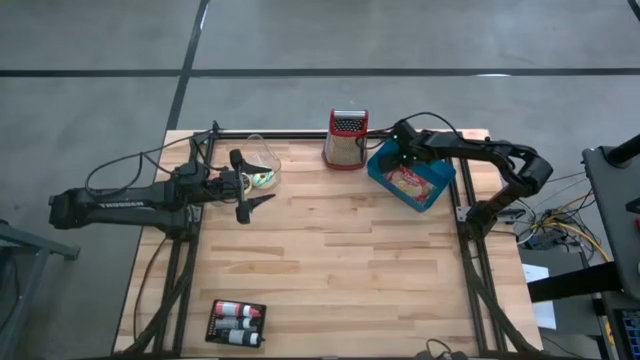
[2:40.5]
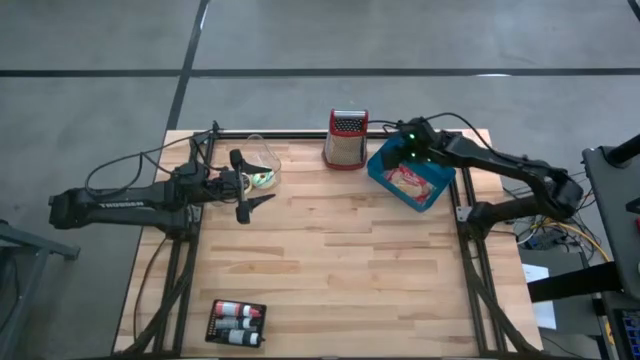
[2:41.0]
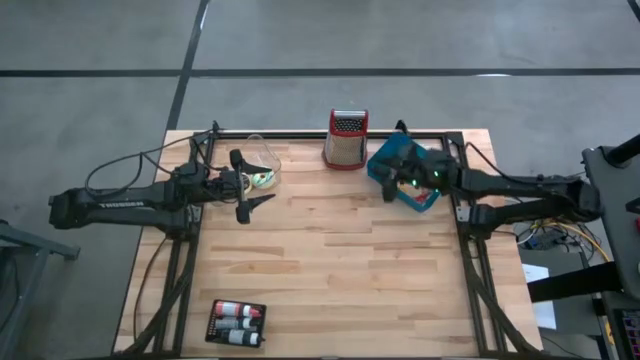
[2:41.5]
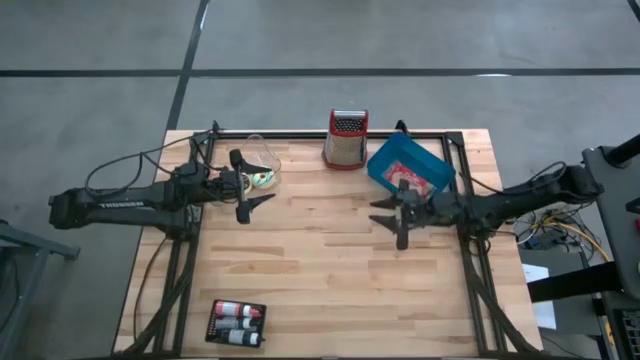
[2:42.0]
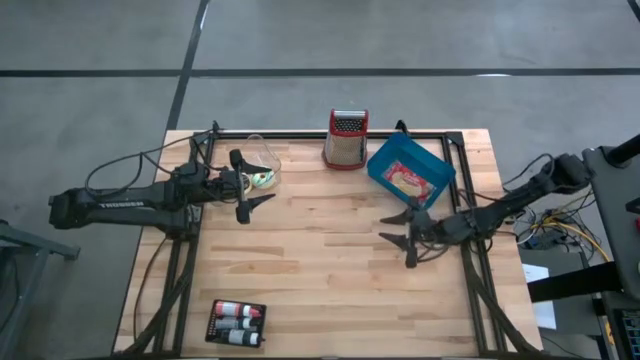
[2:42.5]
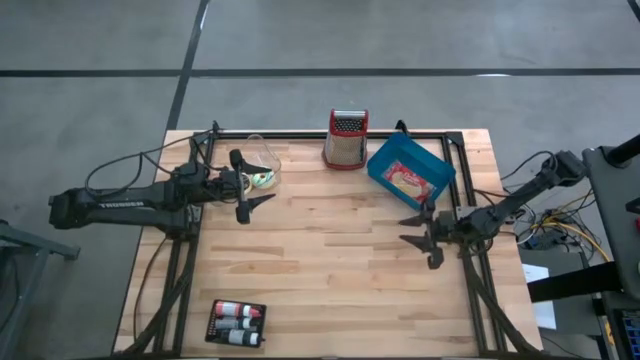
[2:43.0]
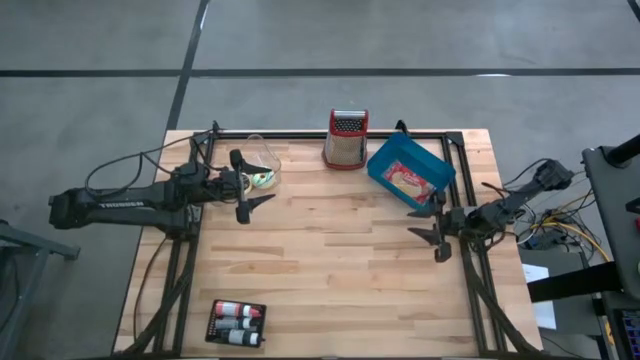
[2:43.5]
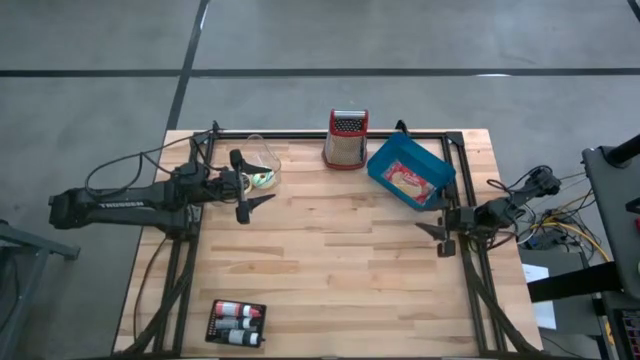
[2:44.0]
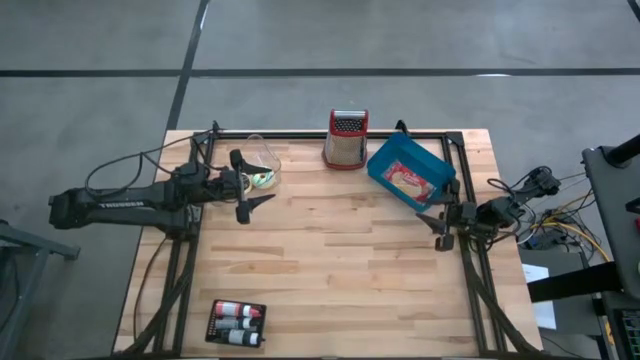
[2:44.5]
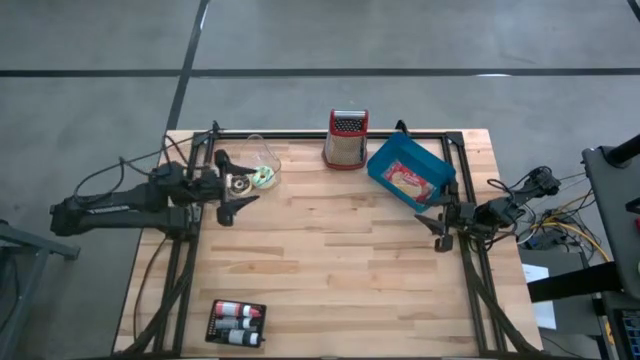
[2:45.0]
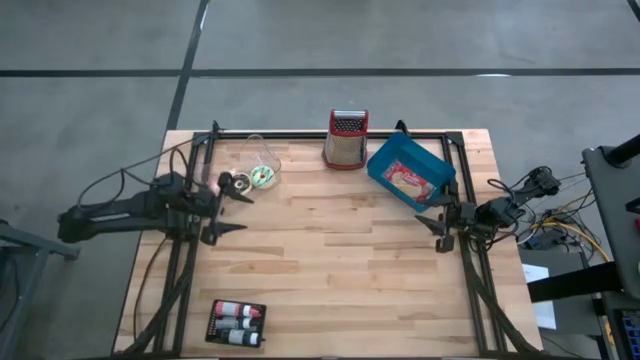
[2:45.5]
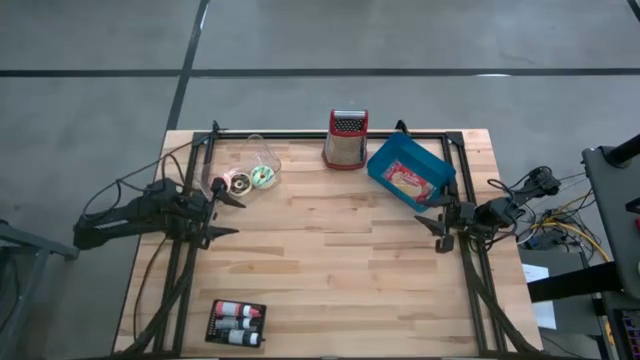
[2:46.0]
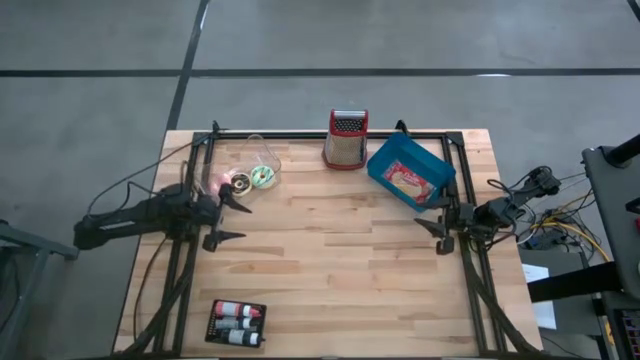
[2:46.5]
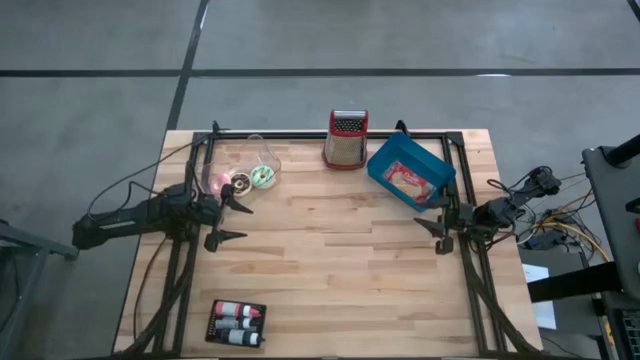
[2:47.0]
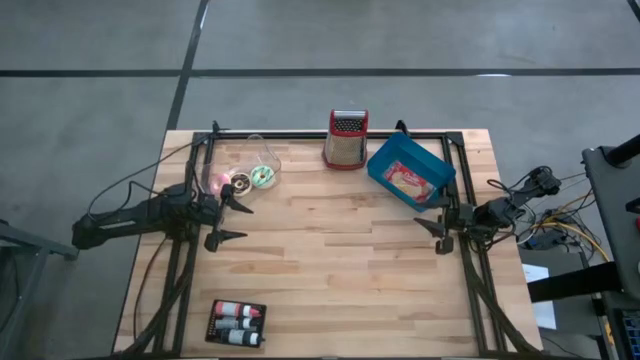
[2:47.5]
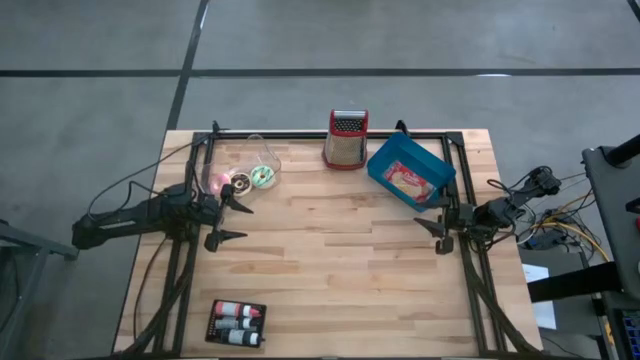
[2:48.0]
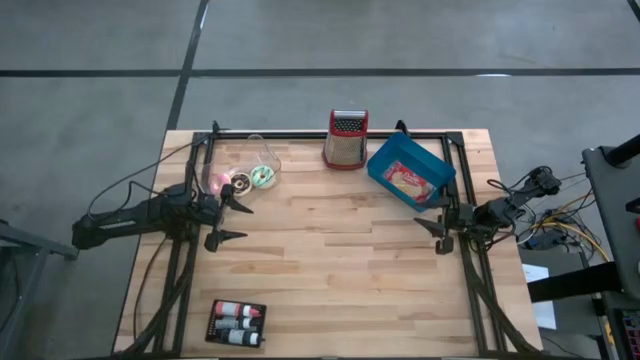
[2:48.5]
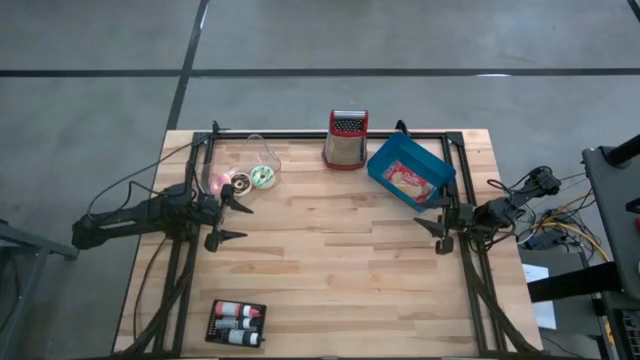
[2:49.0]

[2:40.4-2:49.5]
Task: Pick & Place Food Item
Return to Home Position

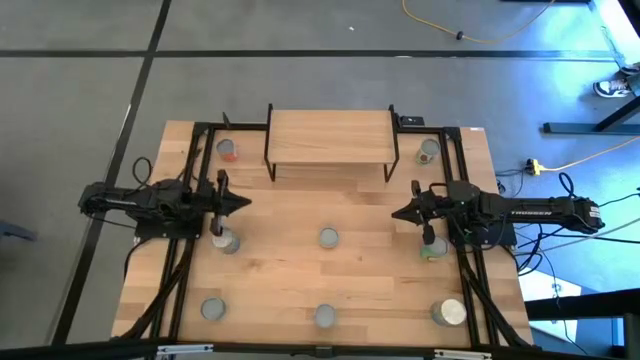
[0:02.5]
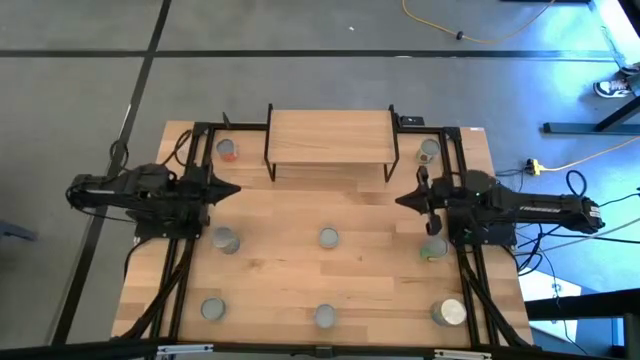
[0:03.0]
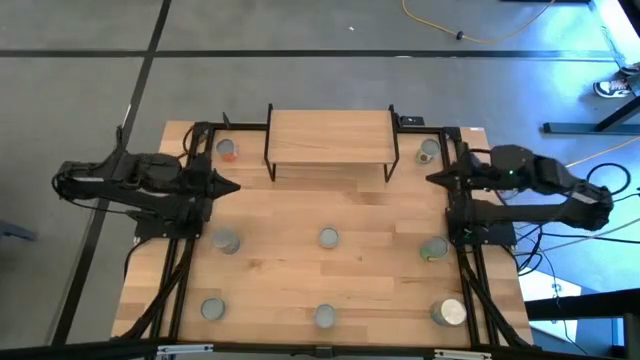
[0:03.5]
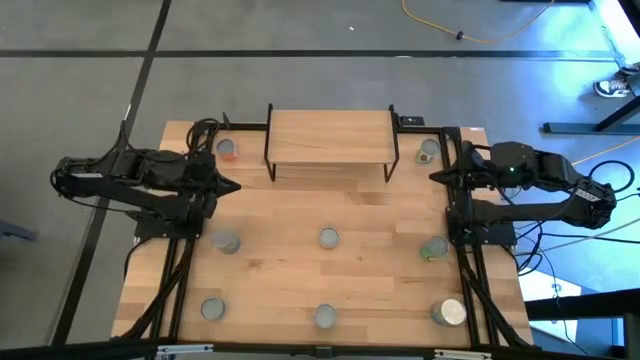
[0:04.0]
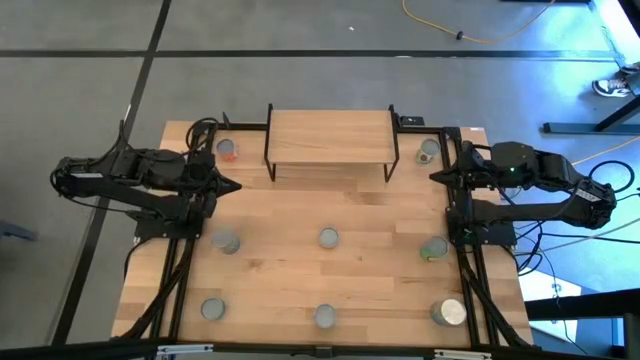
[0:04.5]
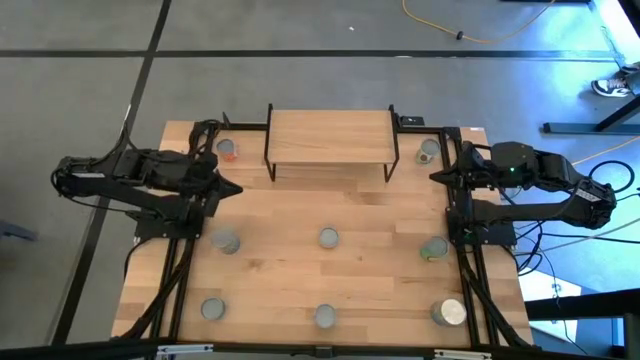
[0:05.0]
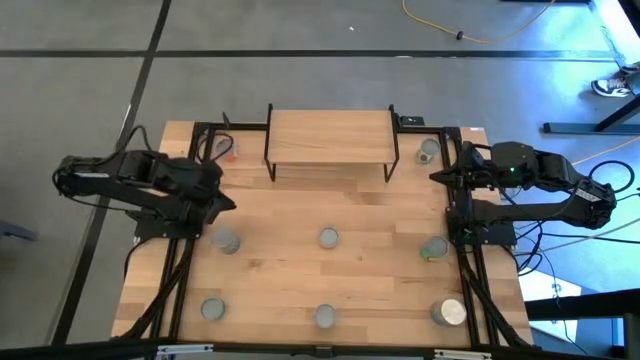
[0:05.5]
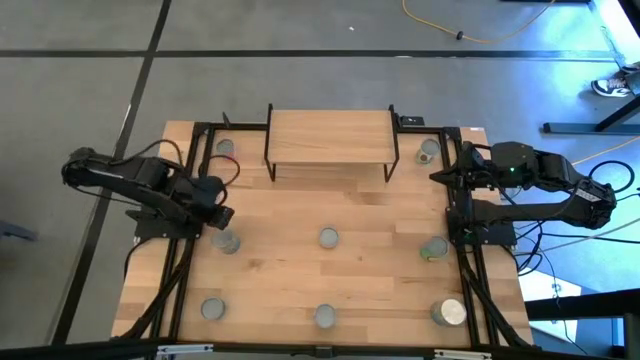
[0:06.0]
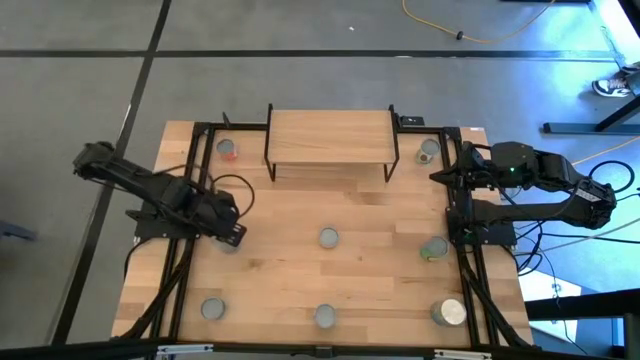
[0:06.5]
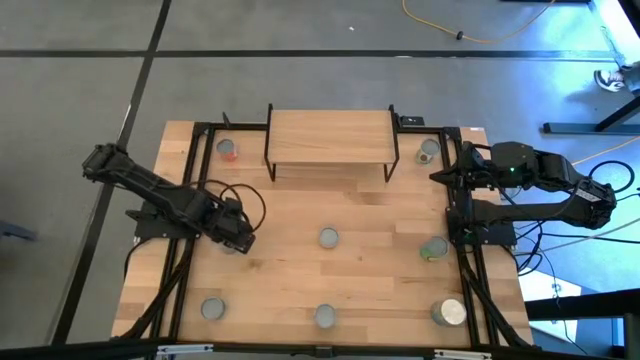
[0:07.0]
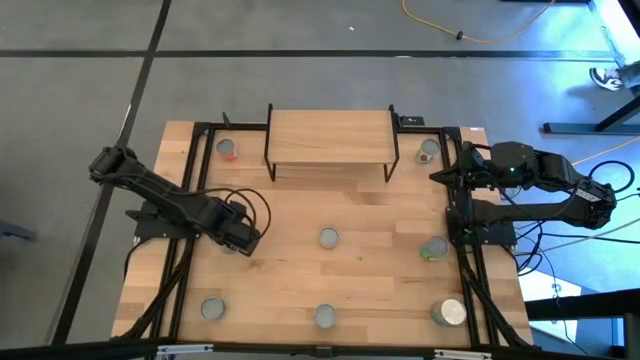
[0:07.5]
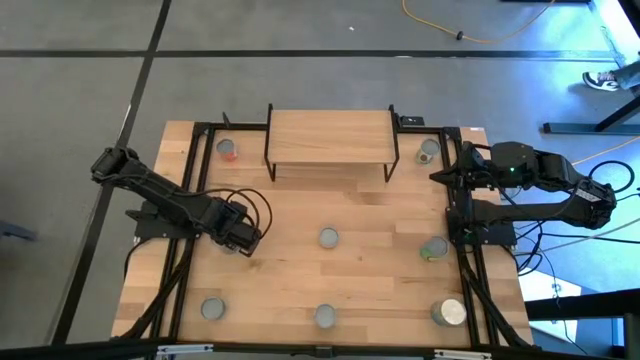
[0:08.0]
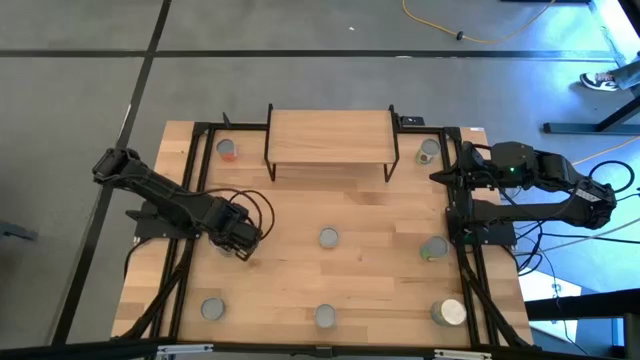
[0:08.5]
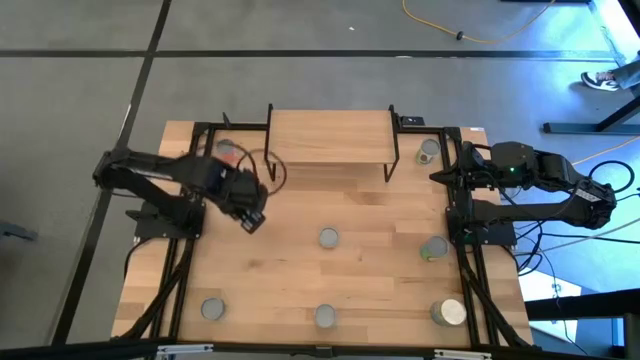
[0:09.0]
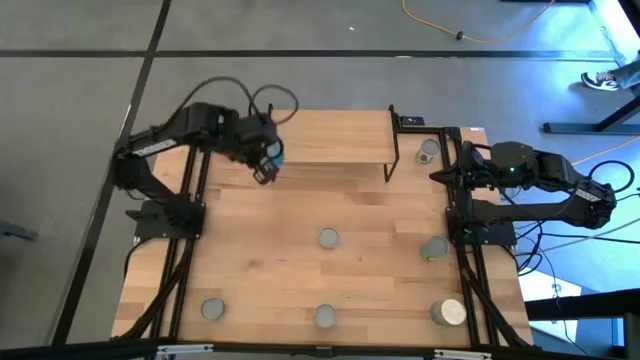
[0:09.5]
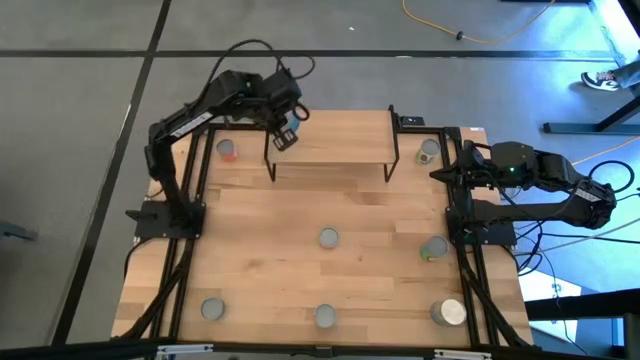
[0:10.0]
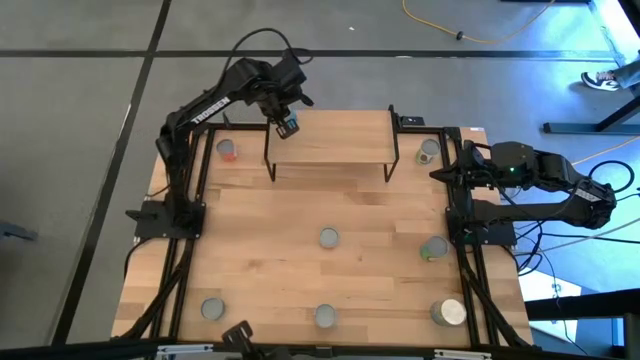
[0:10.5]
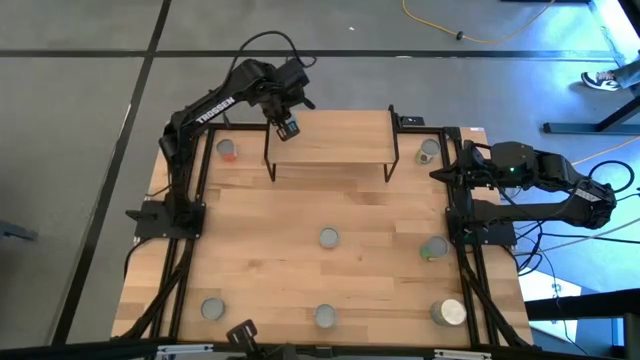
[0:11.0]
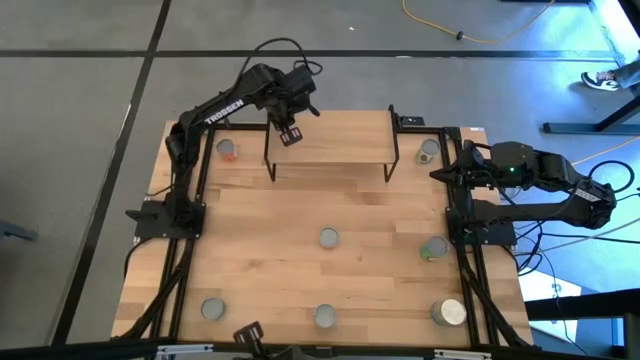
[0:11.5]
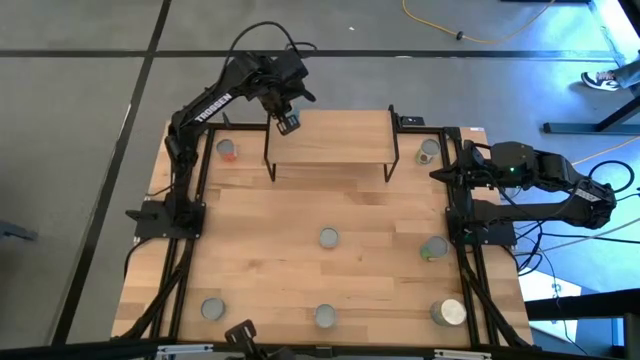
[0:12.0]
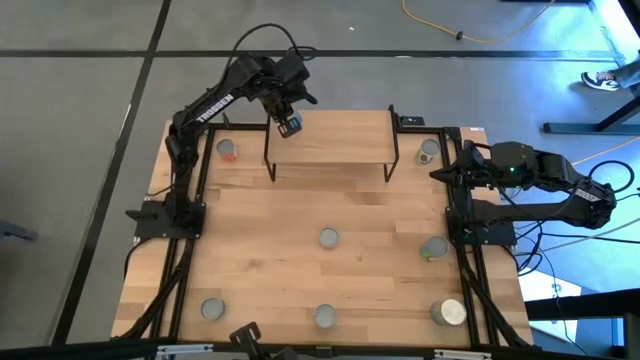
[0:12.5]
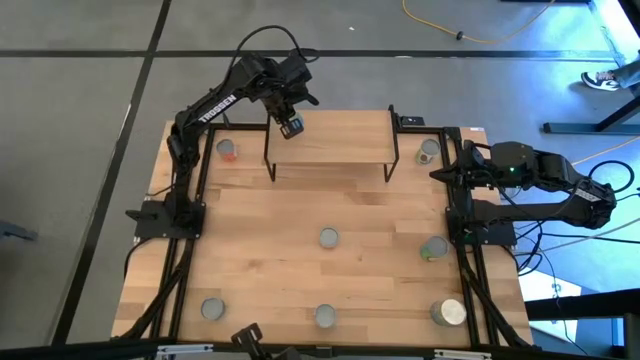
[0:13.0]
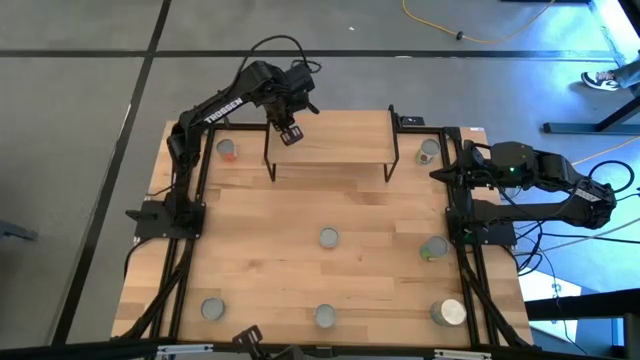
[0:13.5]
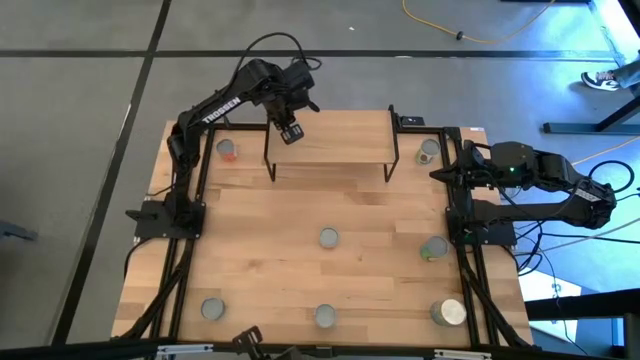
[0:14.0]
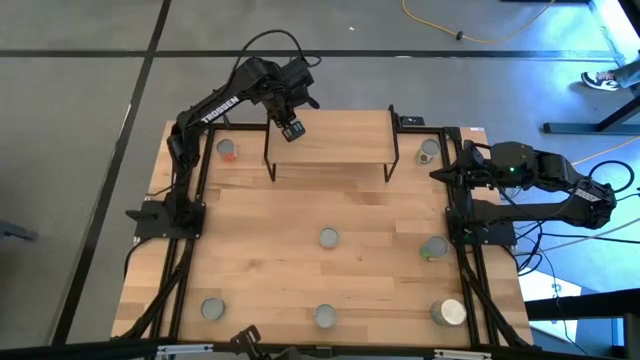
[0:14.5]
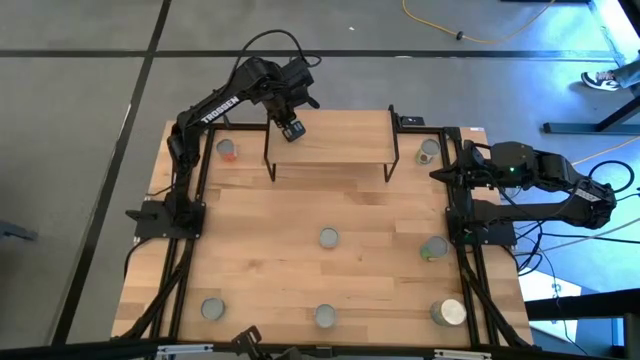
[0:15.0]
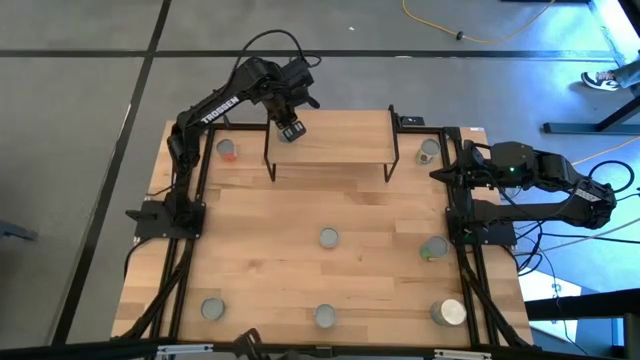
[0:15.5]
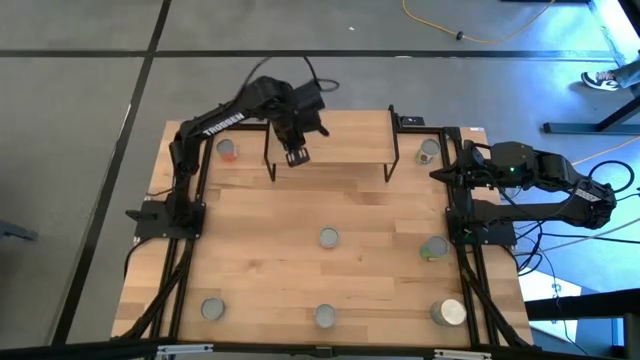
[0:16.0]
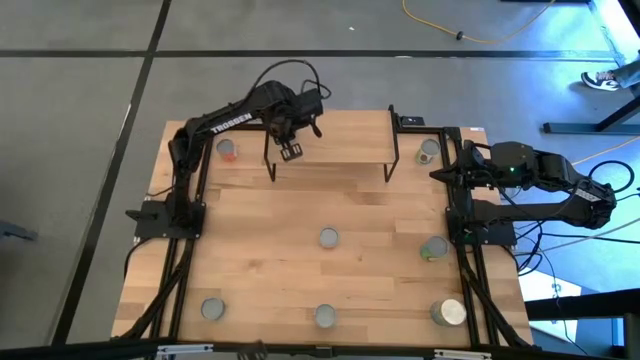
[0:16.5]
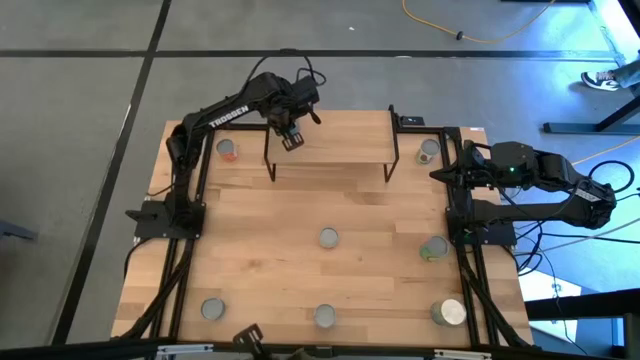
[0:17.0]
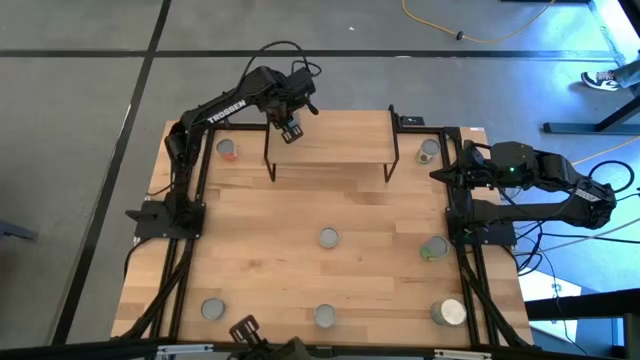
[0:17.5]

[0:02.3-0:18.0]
Task: Pick and place cans onto a shelf
Put the left canned cherries on the shelf
